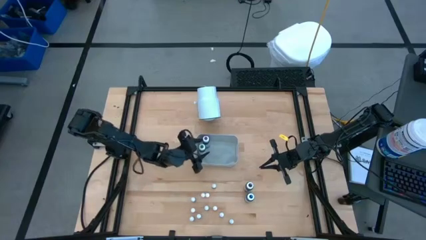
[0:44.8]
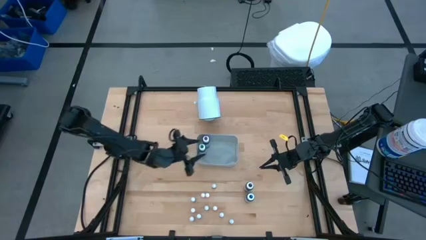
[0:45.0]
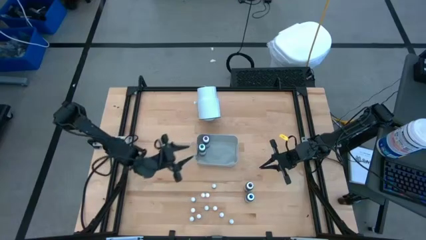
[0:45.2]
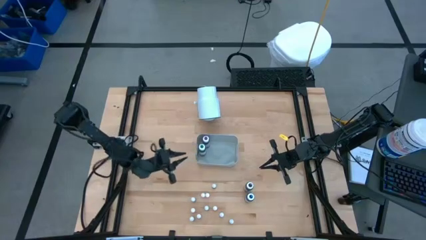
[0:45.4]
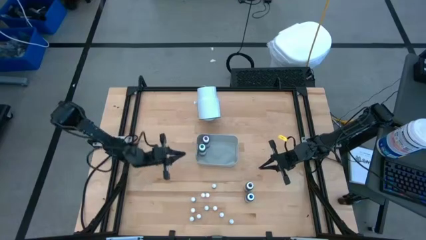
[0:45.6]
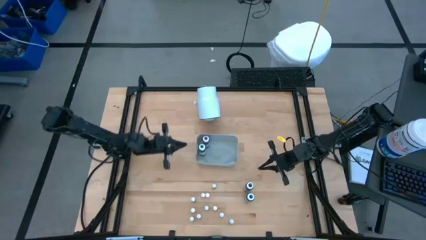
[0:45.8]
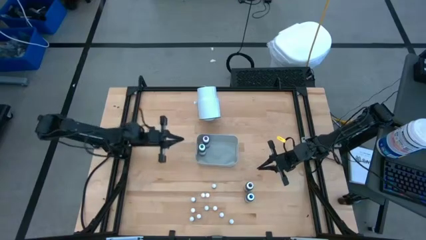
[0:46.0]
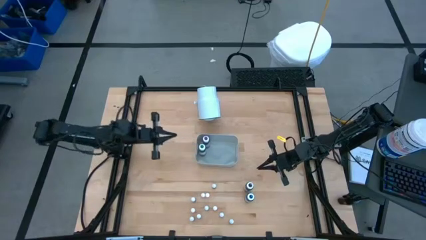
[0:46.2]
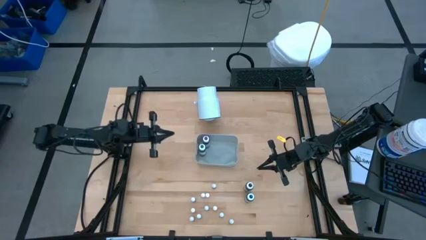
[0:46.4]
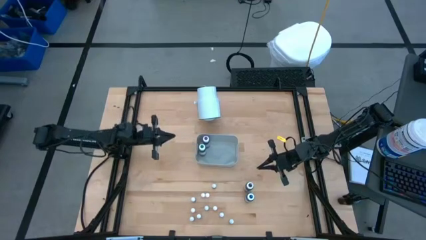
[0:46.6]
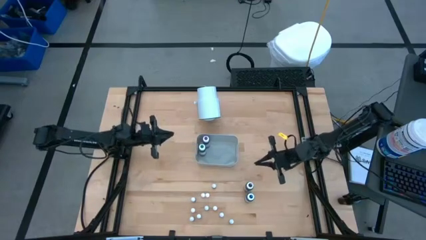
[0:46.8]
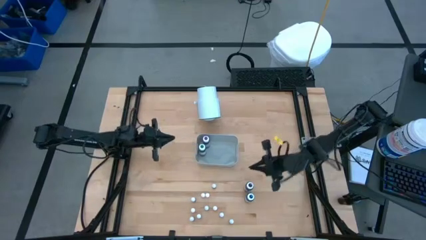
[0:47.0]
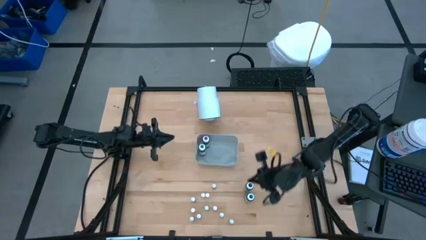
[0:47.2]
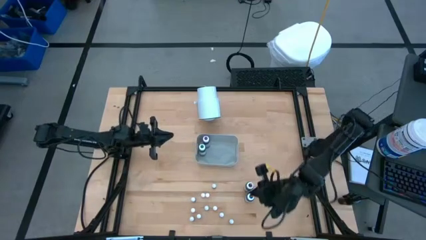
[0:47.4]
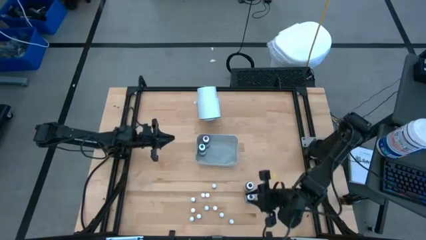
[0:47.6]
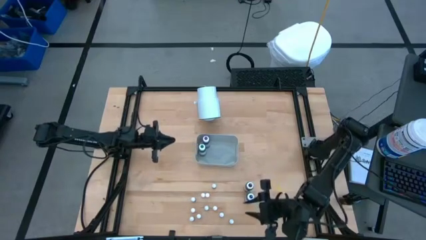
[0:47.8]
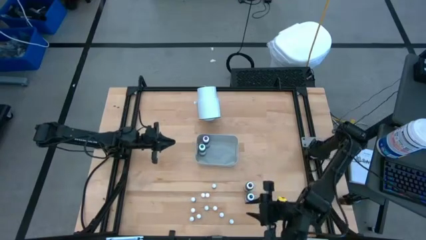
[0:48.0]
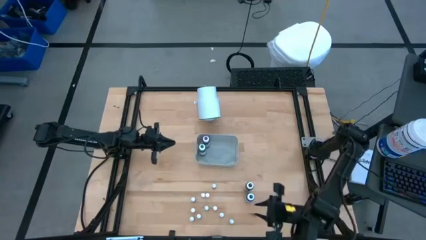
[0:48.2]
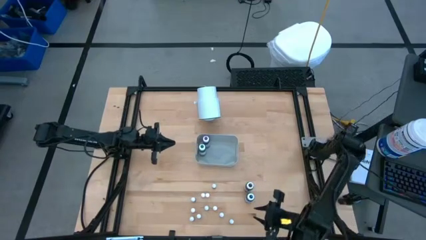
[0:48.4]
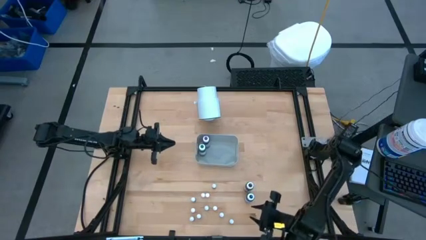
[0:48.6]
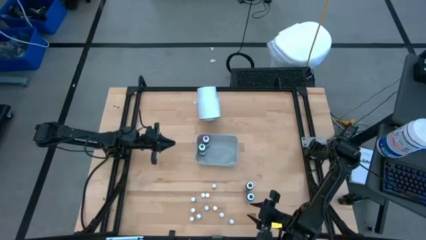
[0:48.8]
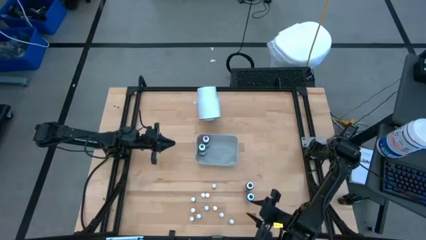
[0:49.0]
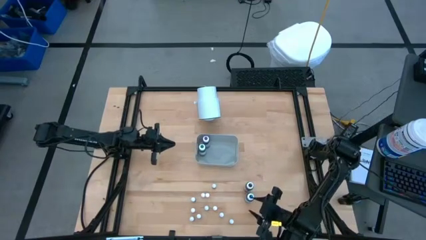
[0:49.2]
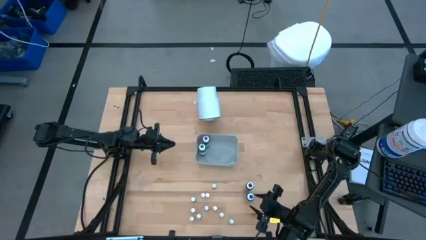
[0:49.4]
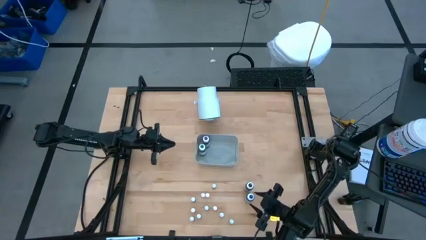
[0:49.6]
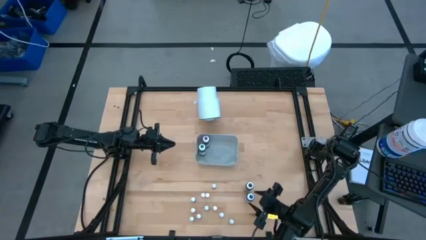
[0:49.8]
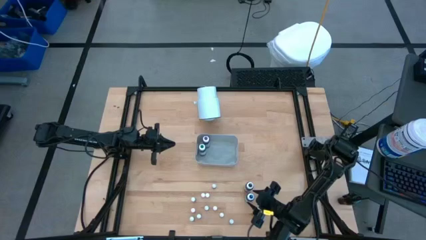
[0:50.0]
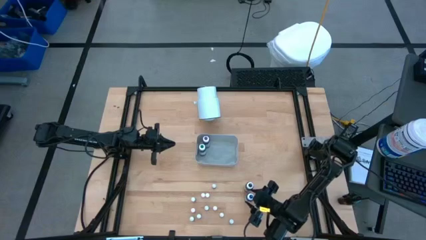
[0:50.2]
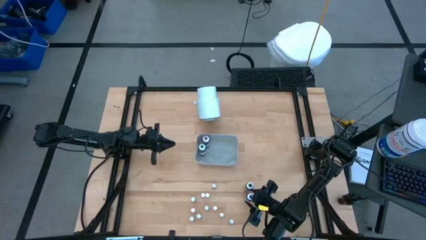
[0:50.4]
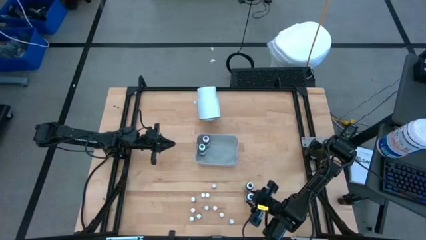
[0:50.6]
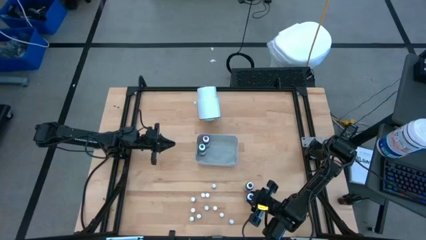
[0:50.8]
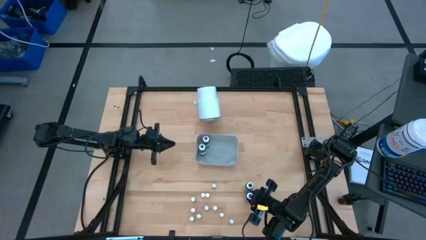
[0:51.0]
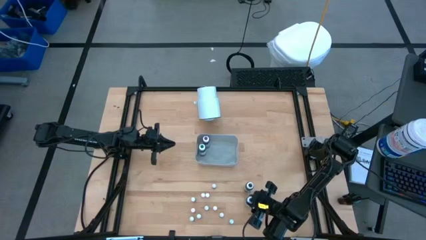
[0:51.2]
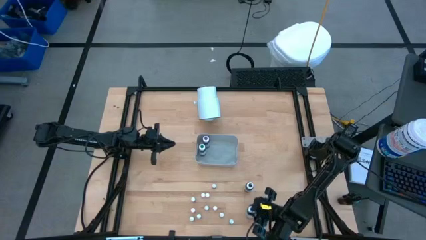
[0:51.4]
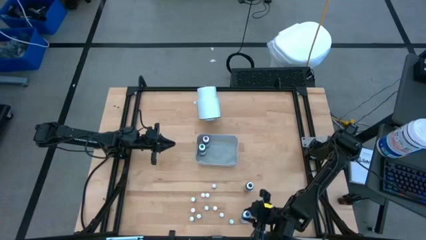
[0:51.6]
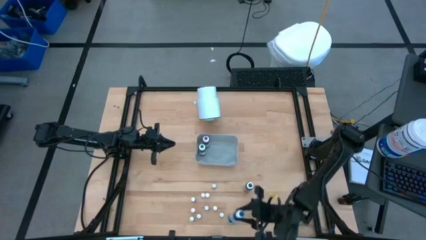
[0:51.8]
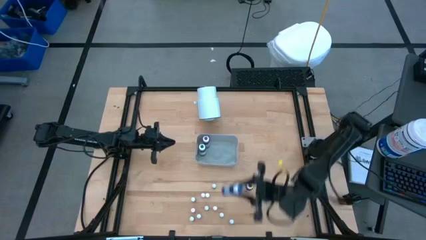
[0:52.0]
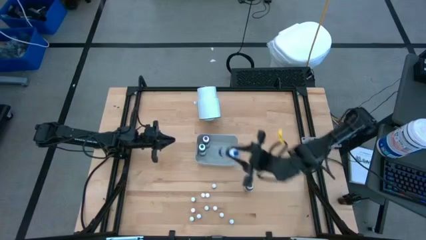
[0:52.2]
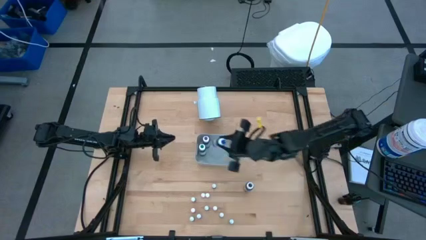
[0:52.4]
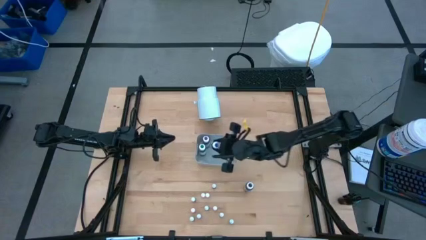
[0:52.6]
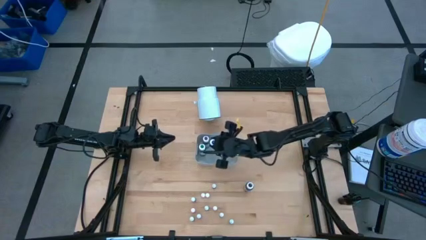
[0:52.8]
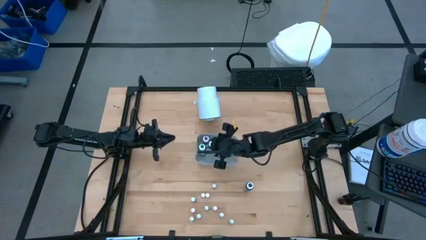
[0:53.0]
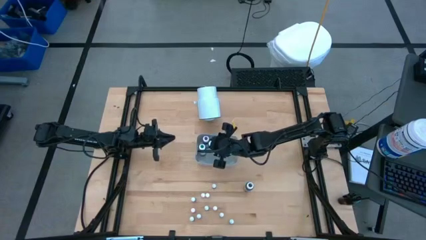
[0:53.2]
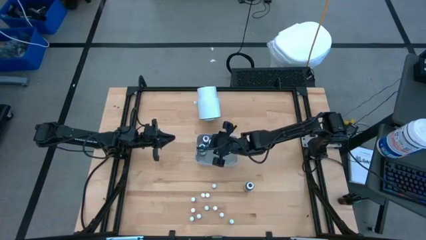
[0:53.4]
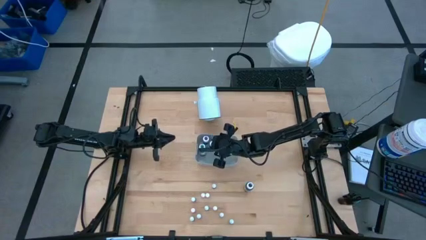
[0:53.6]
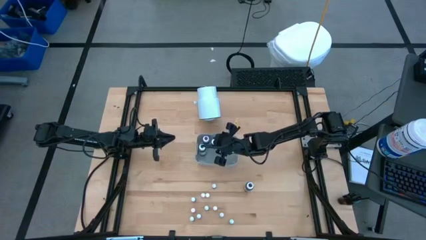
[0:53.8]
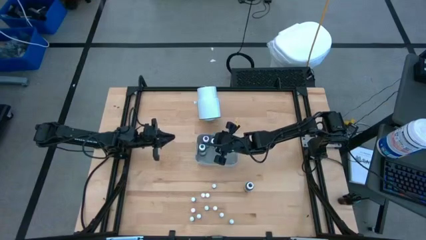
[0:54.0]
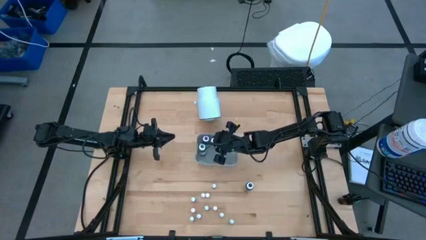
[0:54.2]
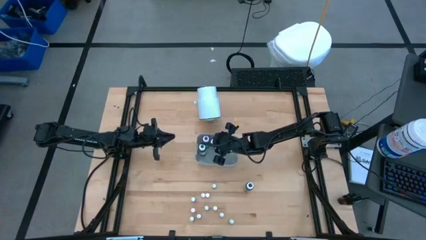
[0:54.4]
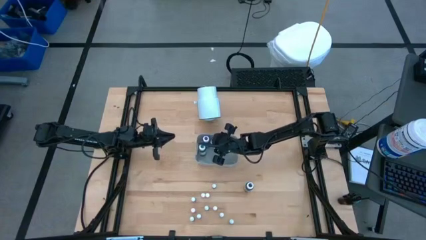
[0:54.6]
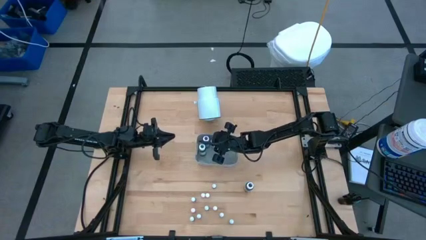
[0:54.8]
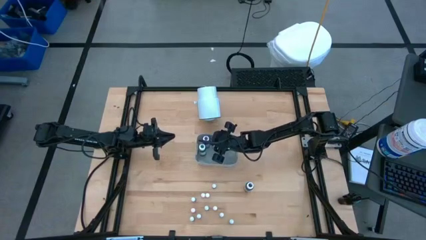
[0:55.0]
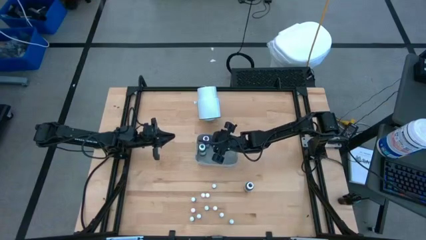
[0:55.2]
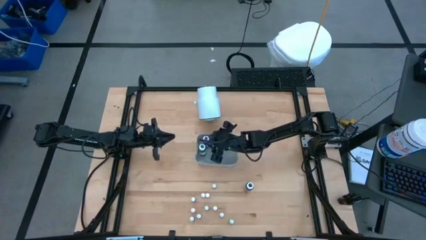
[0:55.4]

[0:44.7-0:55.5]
Task: Pick & Place food coloring
Put the blue food coloring bottle into the gray bin

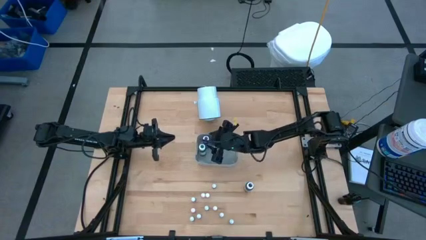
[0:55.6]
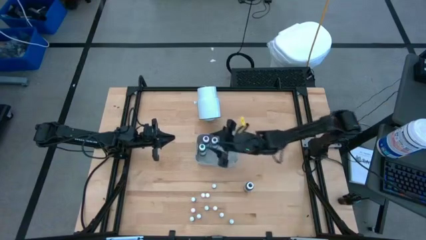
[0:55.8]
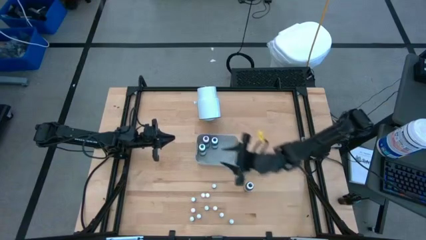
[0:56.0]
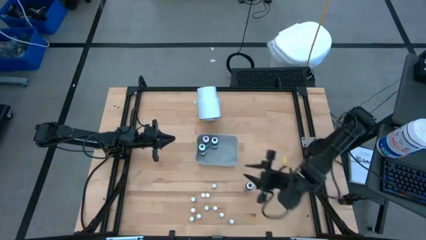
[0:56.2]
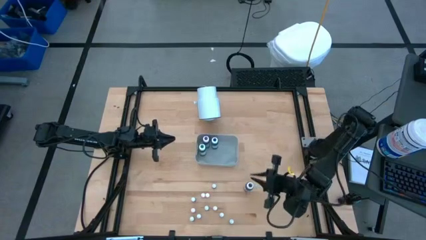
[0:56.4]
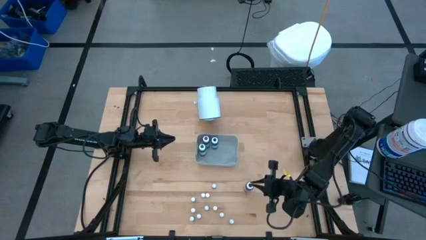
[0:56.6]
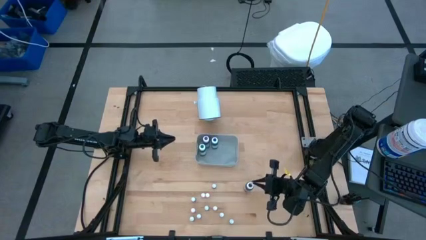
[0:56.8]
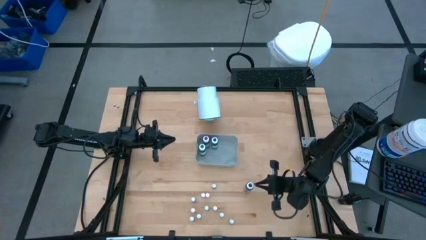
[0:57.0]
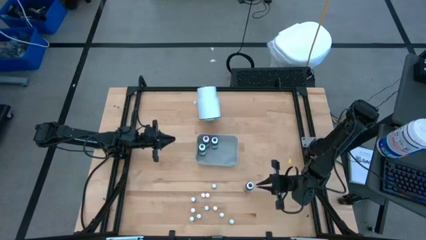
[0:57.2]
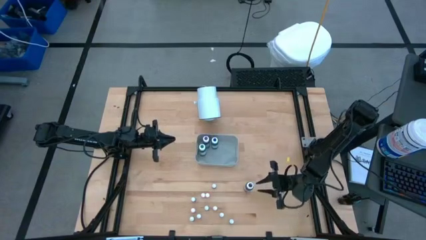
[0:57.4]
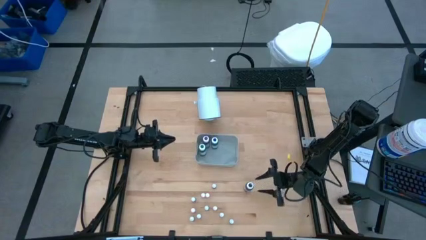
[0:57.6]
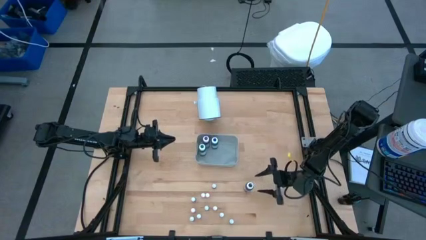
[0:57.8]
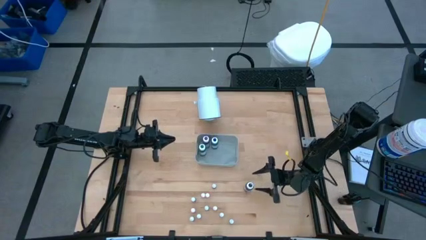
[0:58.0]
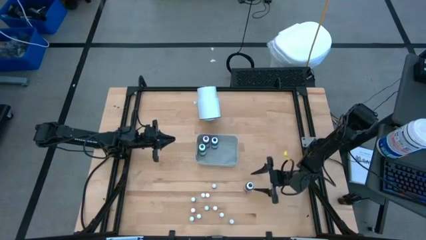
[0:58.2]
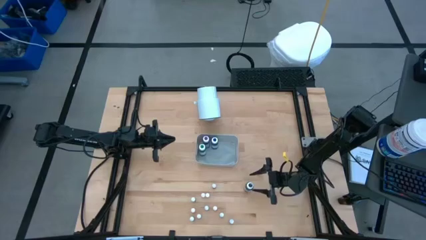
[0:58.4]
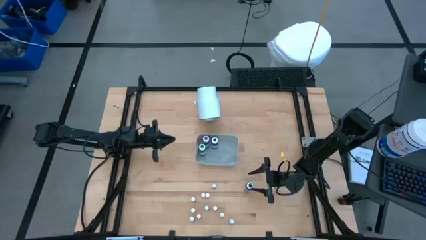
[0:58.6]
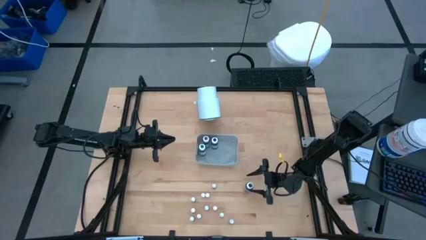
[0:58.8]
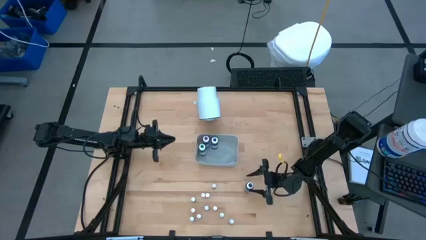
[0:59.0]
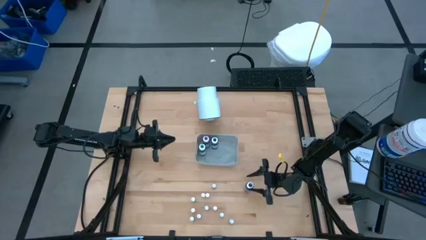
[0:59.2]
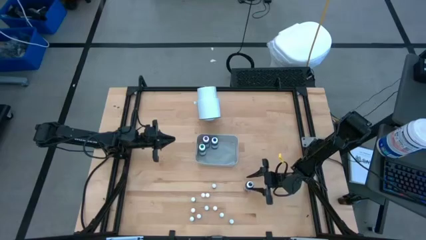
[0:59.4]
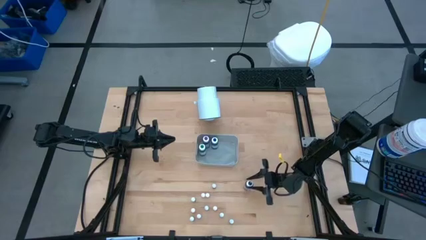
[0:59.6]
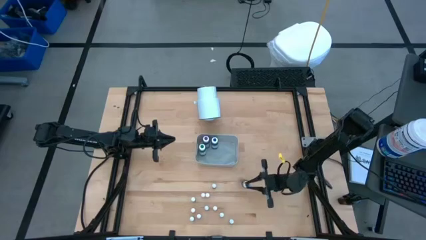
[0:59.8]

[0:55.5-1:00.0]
Put the black food coloring bottle into the gray bin

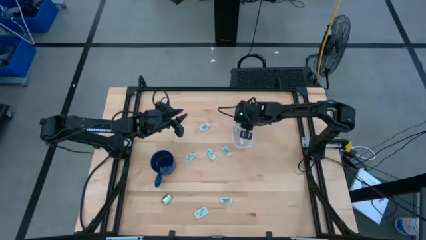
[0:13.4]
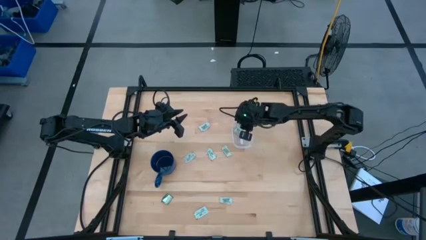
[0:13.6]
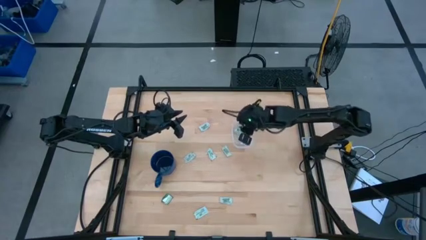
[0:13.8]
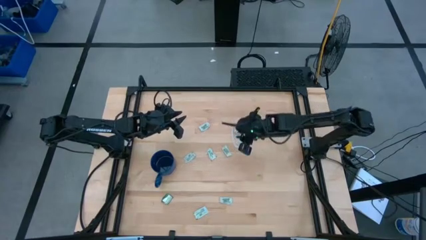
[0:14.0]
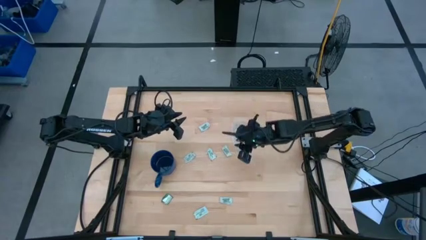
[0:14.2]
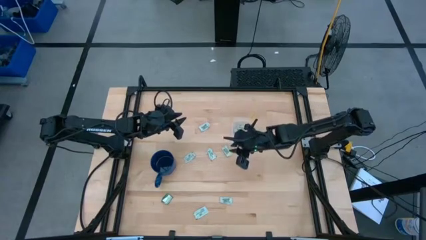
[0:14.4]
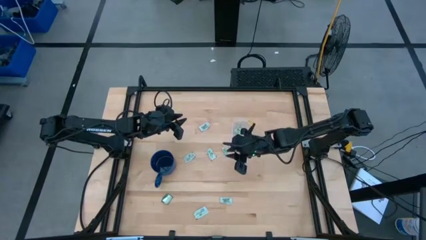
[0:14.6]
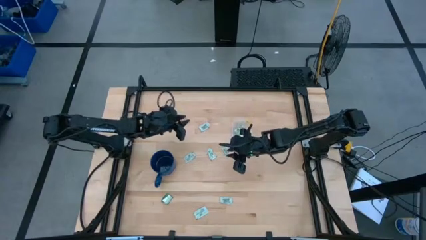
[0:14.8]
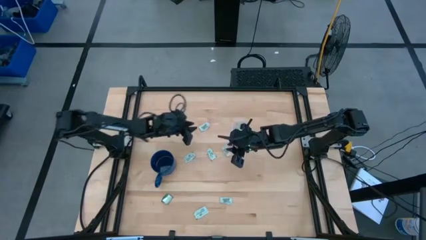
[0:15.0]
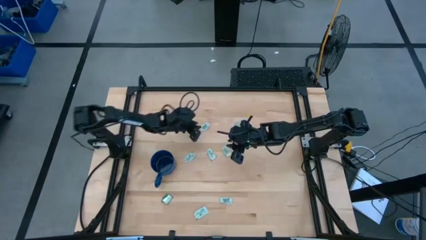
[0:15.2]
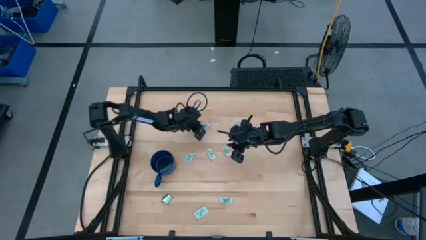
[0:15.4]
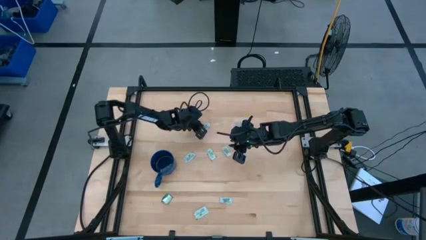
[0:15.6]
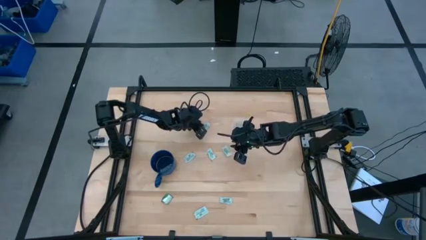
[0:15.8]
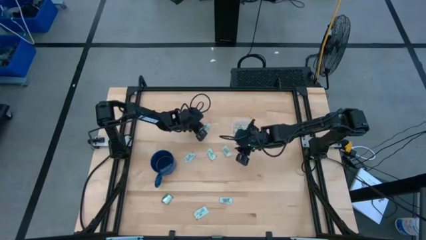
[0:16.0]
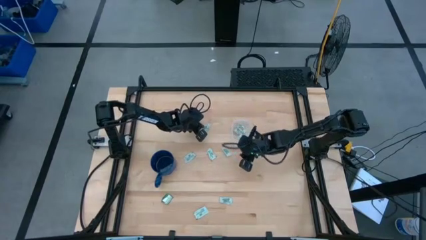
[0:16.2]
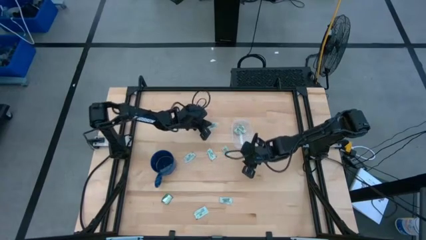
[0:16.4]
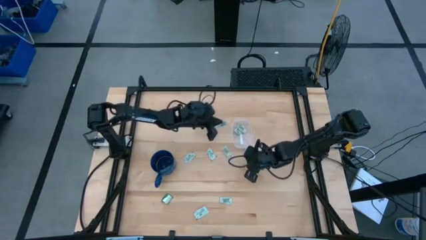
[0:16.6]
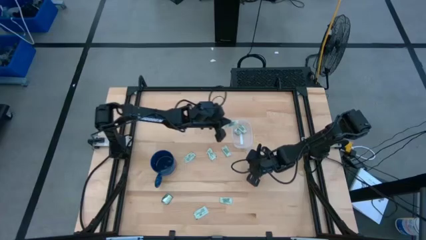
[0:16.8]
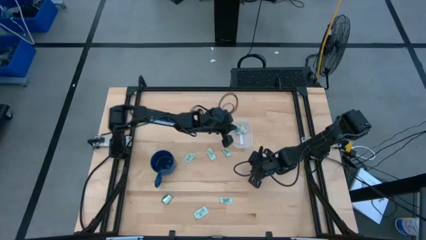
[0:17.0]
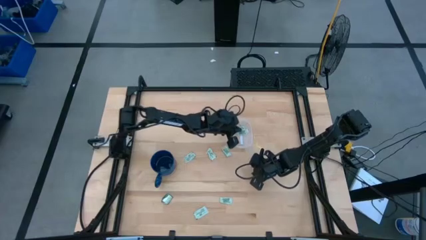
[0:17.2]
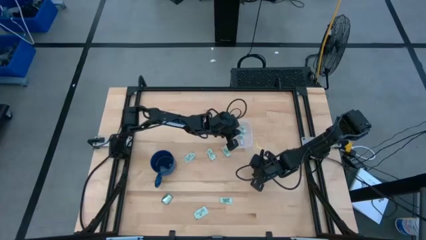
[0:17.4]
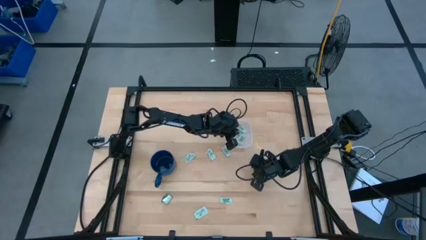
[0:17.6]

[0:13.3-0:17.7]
Task: Pick and place Stevia / Truvia into bins
Put the light green stevia packet into the transparent container
